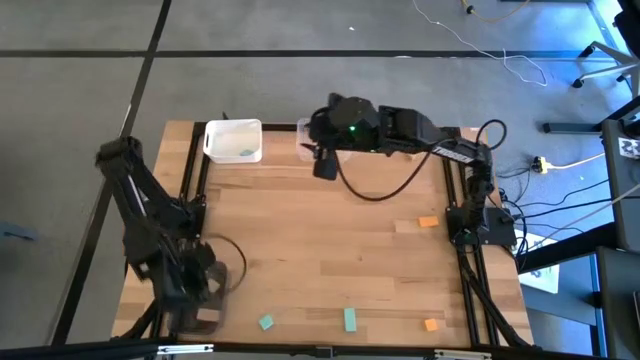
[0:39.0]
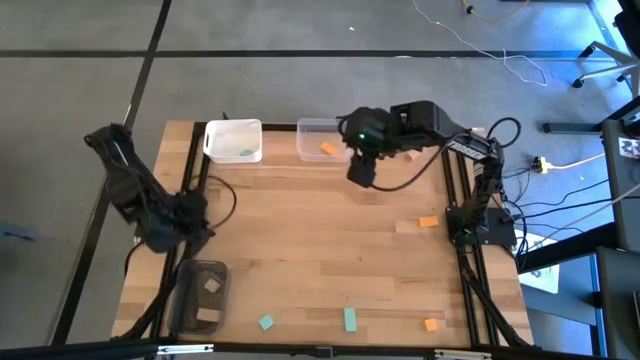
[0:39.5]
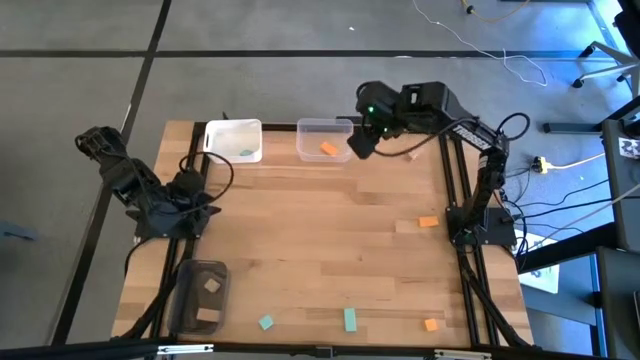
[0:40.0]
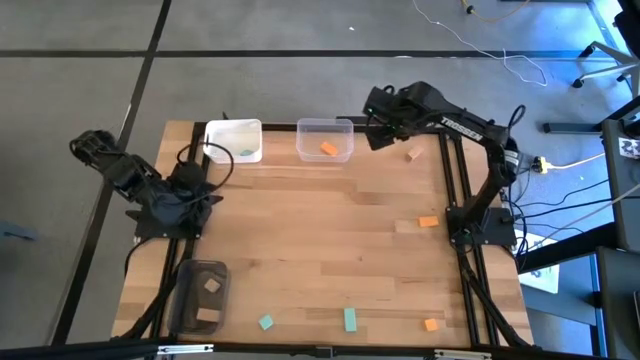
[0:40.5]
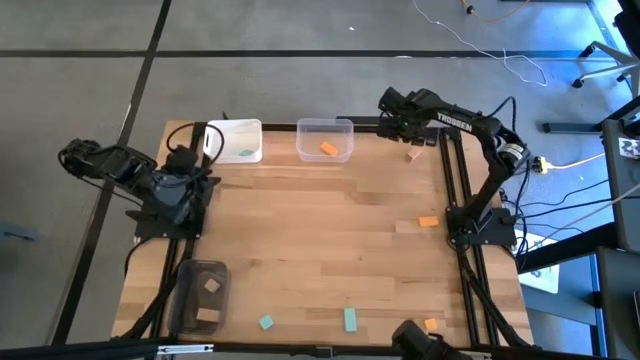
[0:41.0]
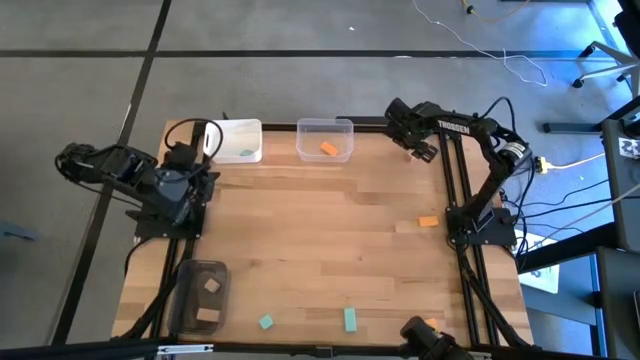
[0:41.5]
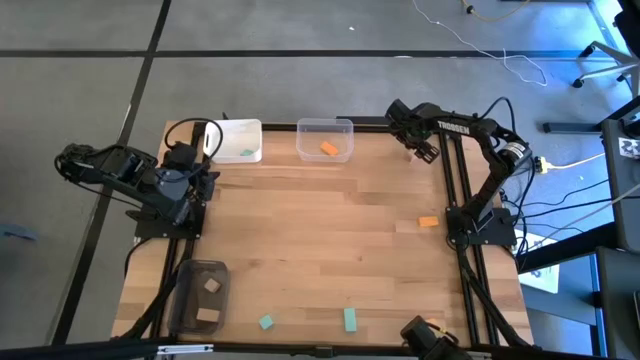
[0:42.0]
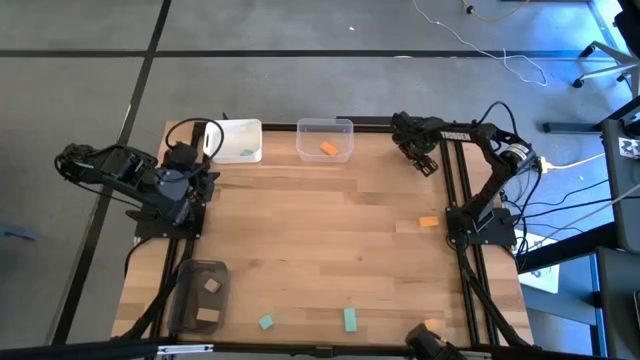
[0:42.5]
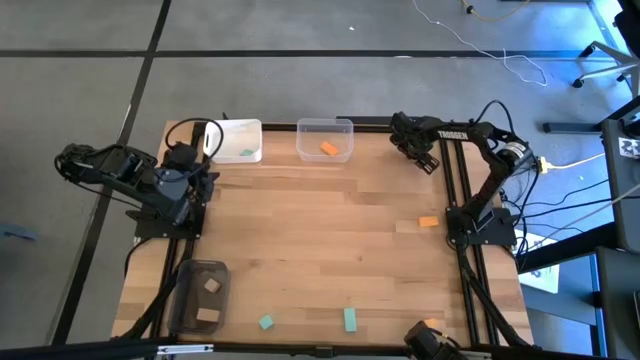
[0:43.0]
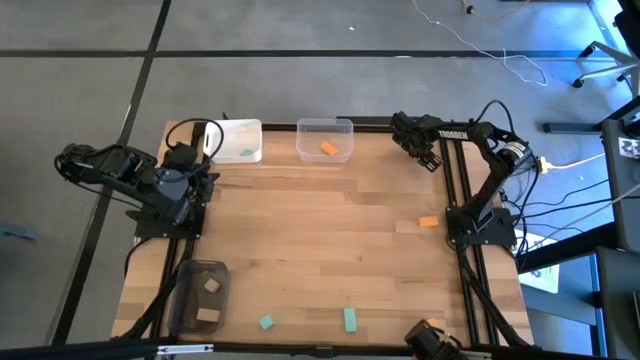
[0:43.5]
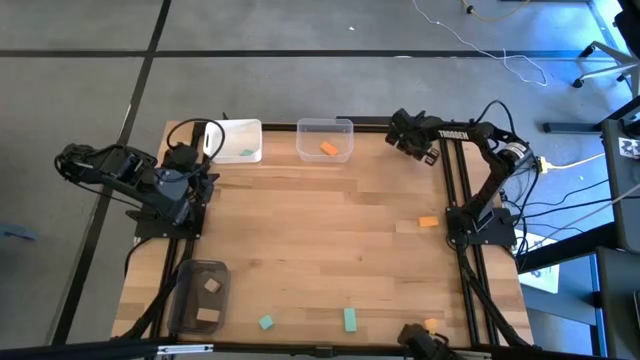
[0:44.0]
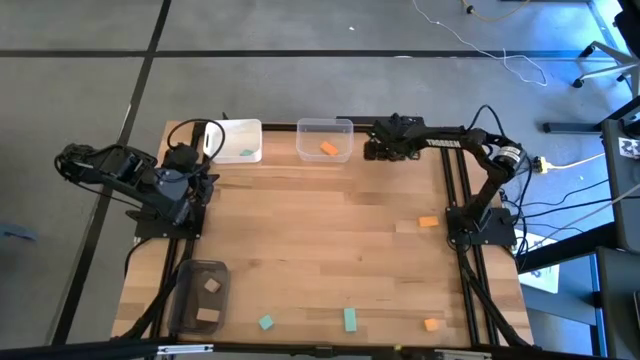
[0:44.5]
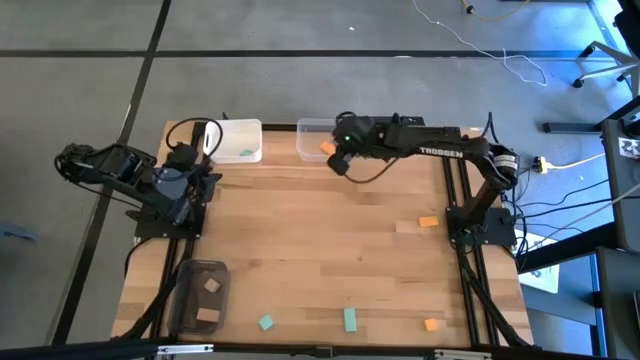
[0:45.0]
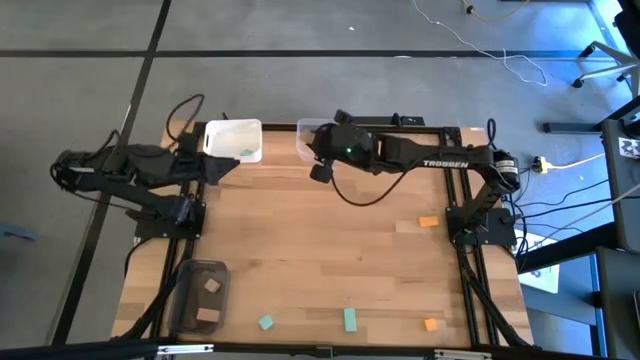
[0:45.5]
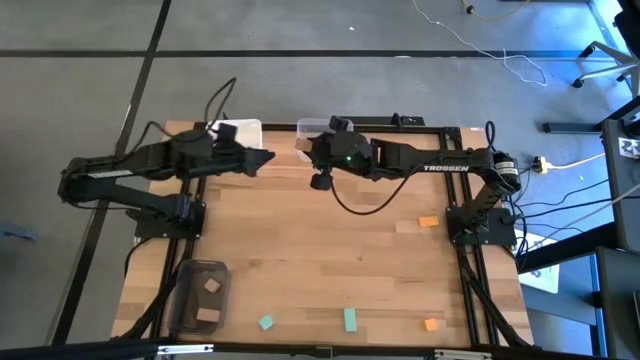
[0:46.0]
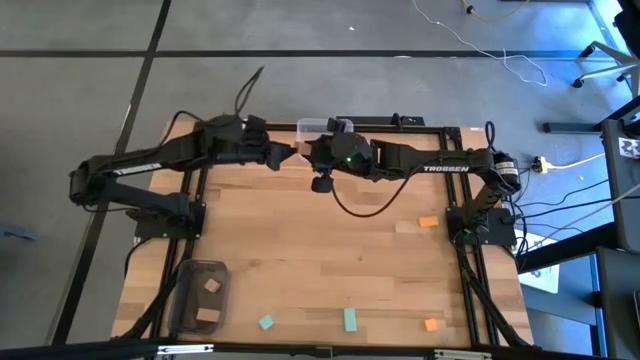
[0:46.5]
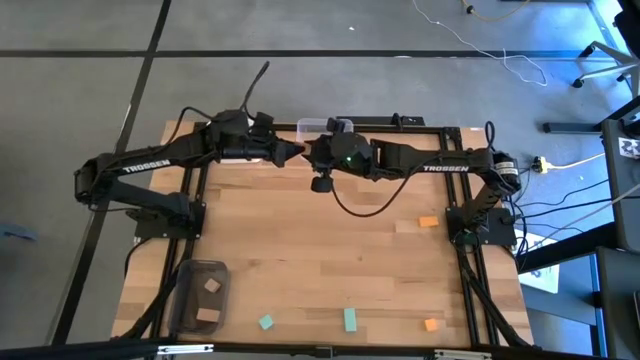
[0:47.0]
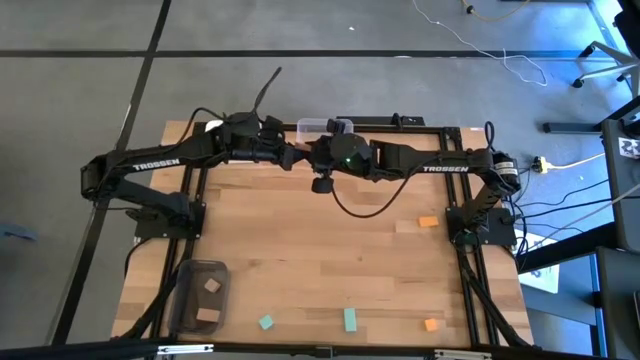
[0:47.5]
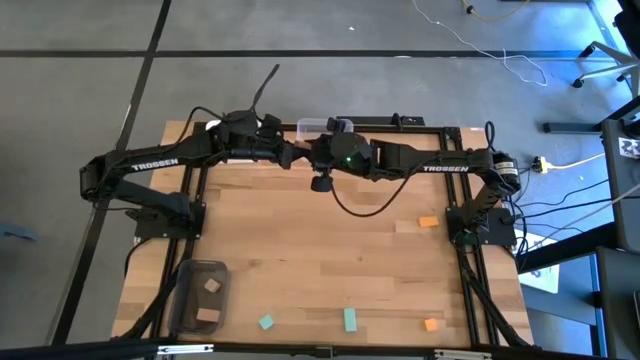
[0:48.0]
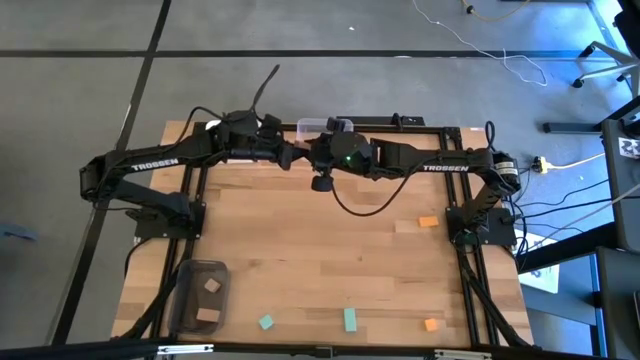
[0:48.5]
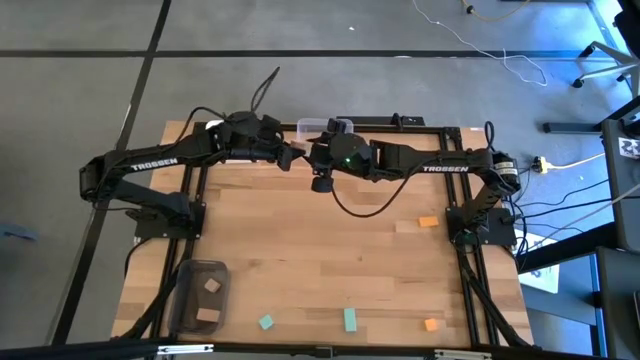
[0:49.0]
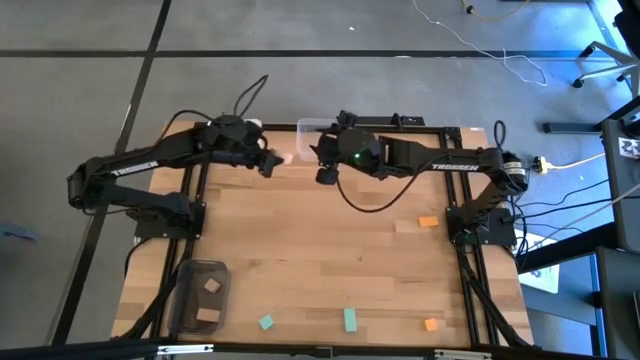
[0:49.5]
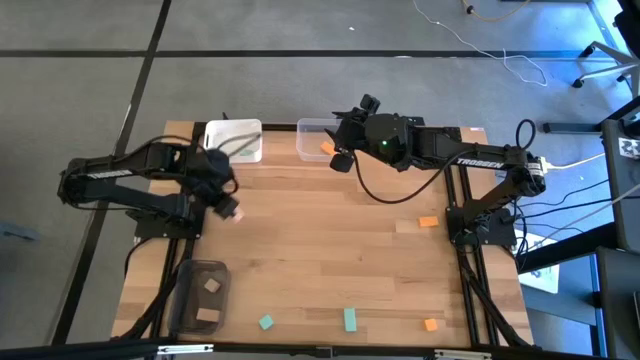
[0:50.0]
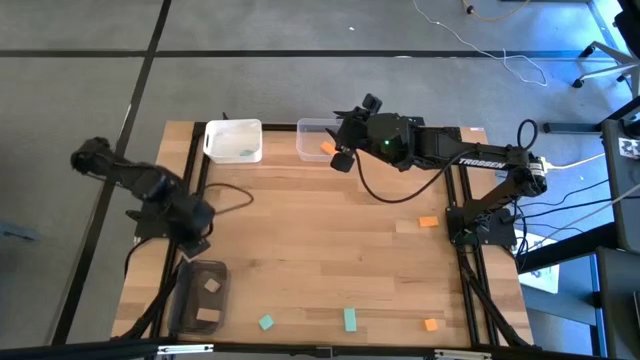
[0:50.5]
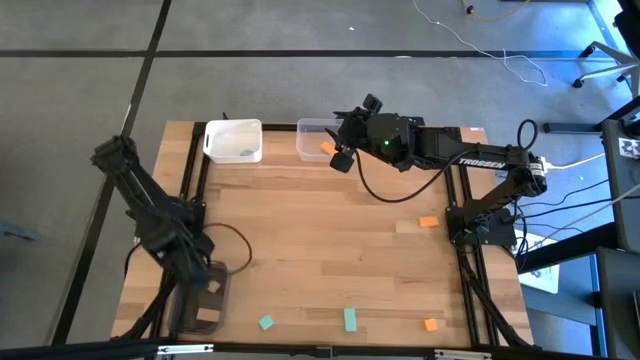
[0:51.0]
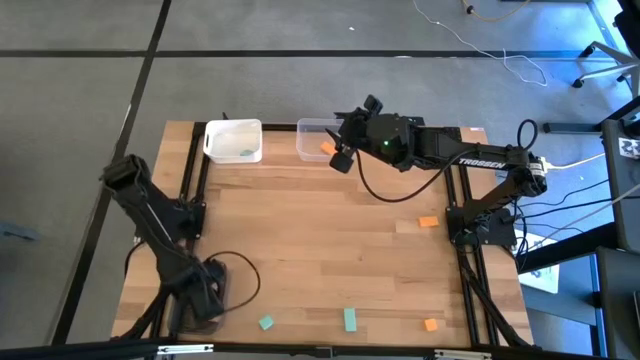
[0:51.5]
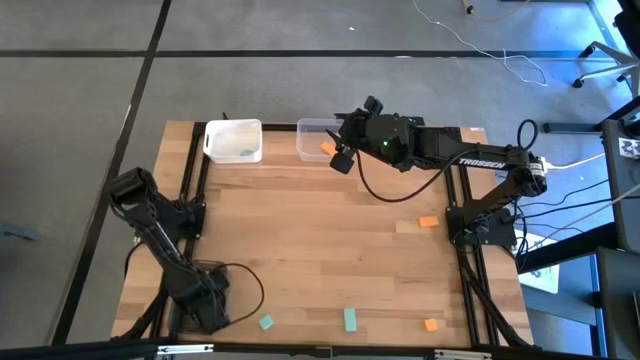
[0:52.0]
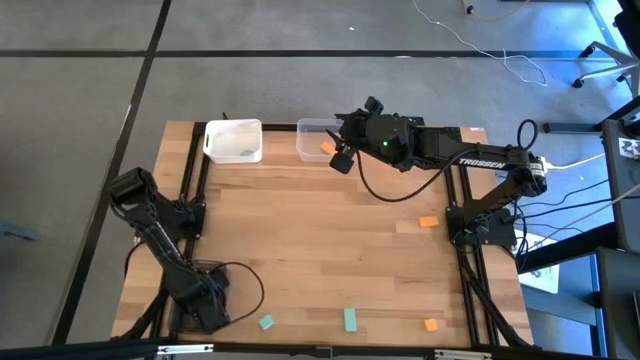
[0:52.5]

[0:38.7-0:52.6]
Task: Sort & place blocks by color
Put the brown block into the black bin

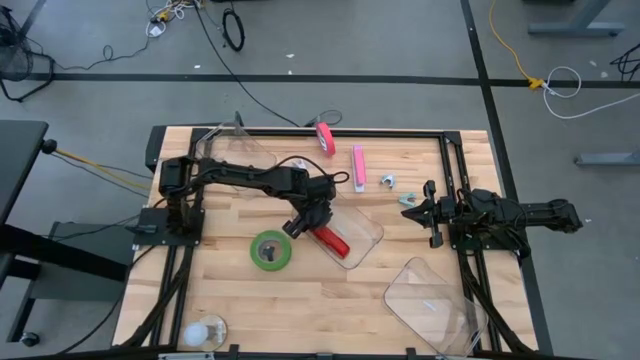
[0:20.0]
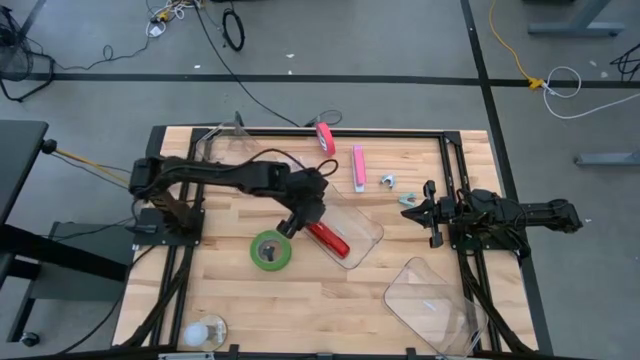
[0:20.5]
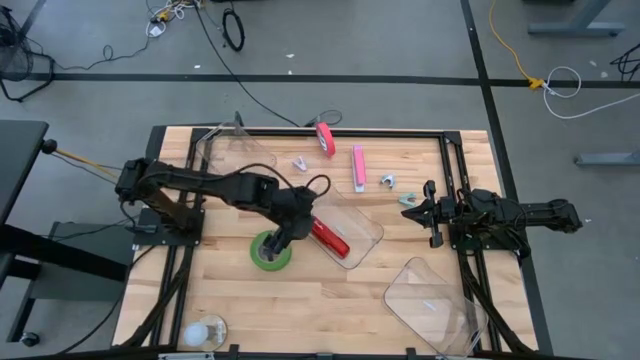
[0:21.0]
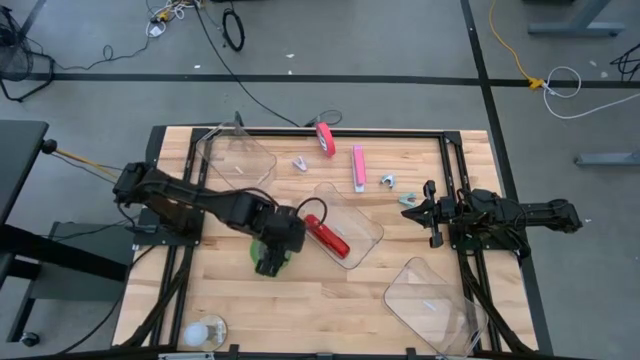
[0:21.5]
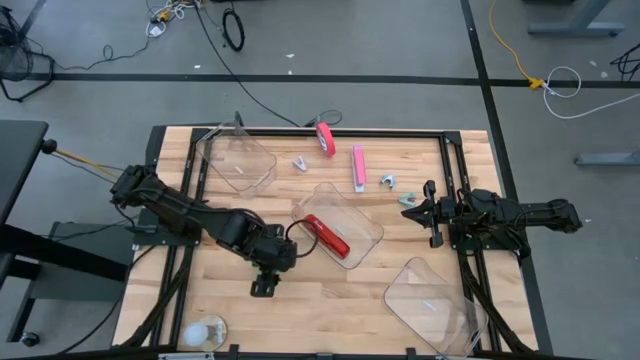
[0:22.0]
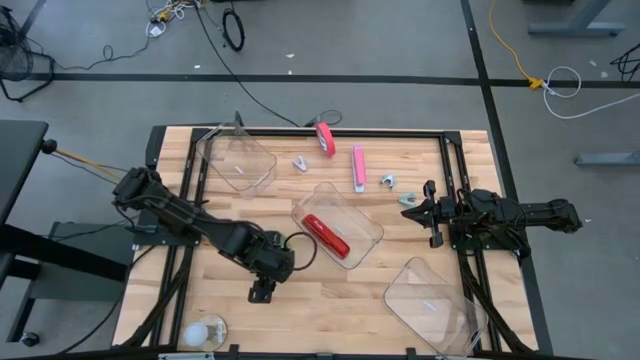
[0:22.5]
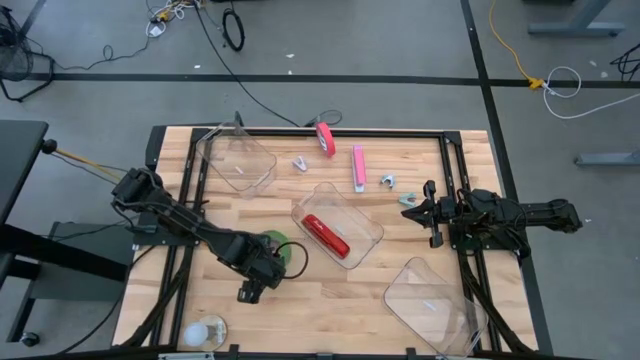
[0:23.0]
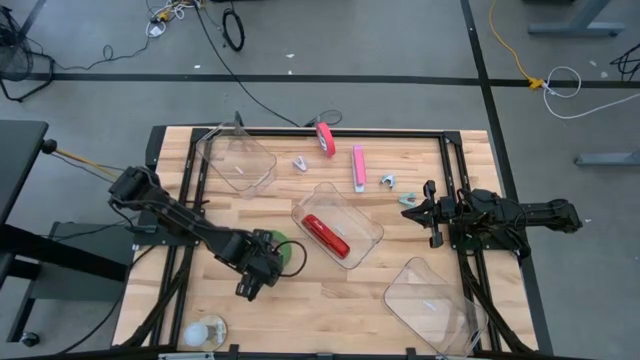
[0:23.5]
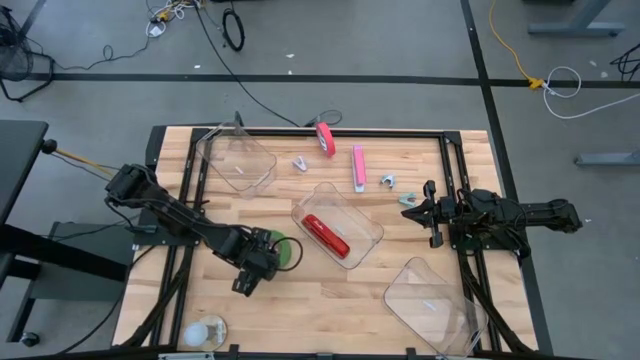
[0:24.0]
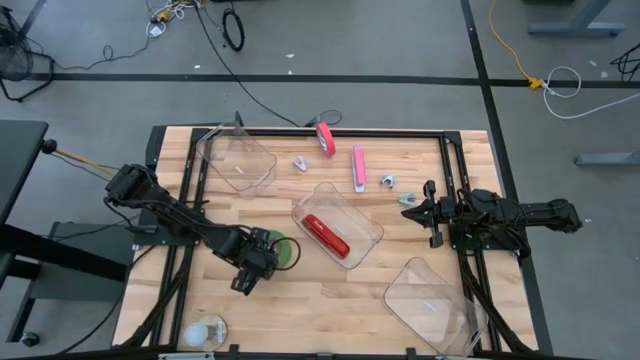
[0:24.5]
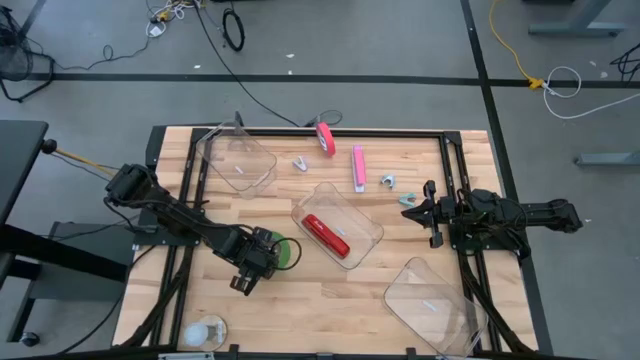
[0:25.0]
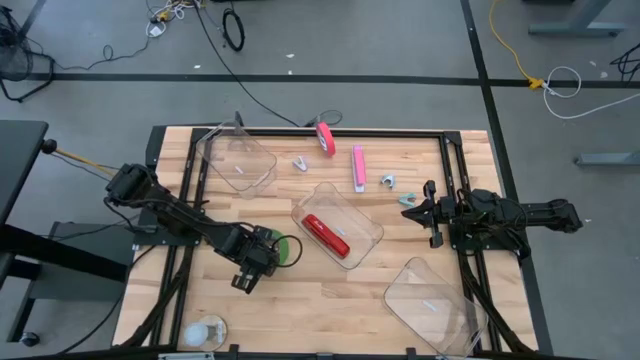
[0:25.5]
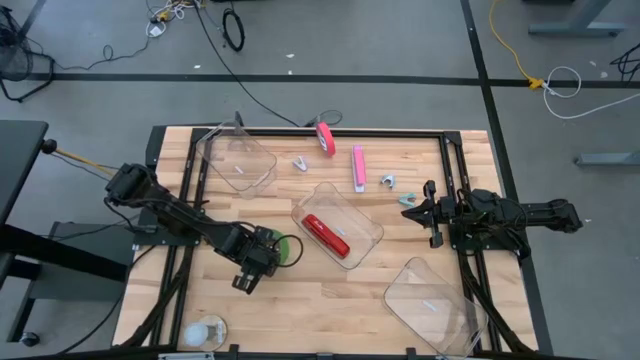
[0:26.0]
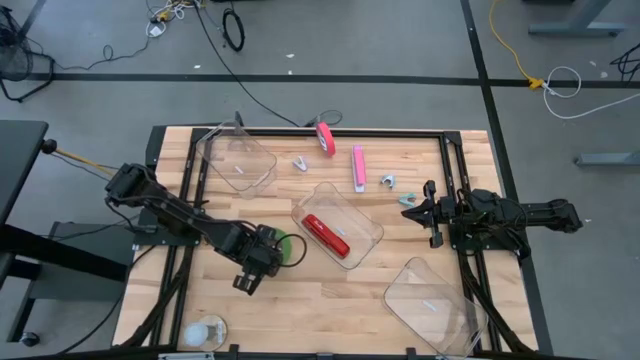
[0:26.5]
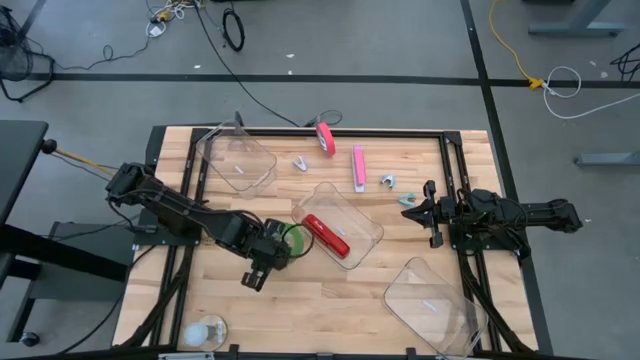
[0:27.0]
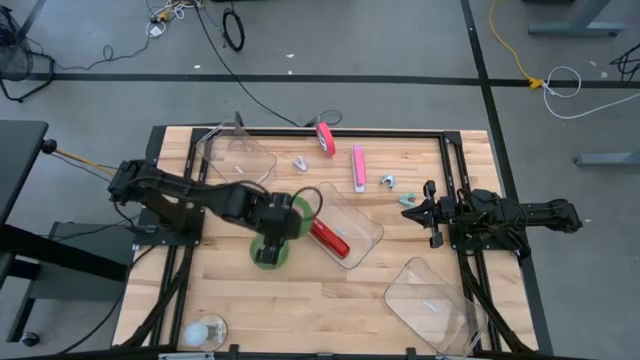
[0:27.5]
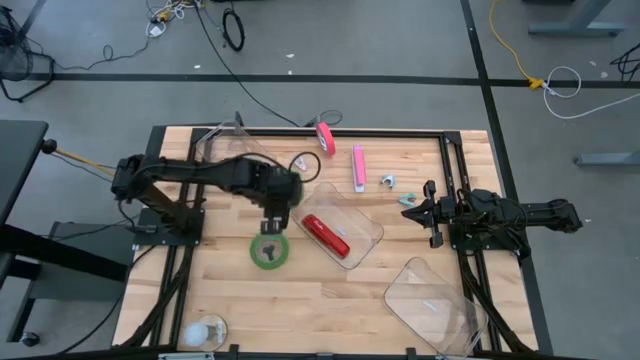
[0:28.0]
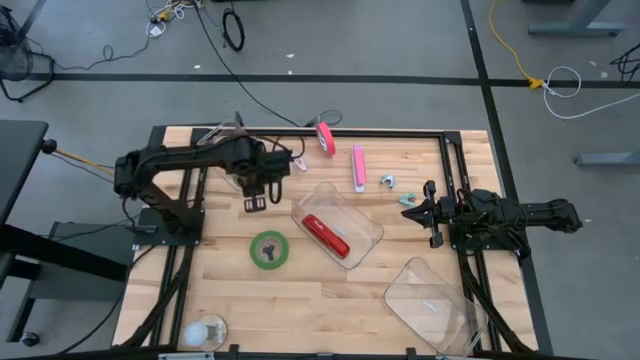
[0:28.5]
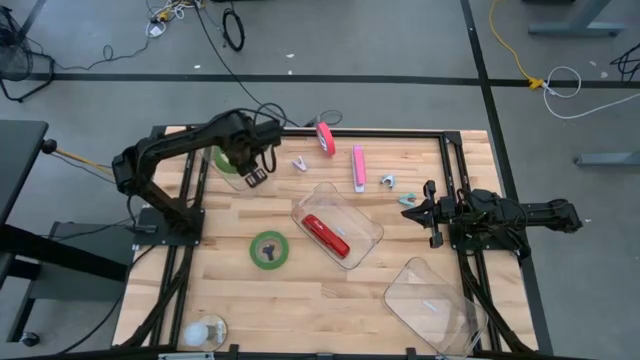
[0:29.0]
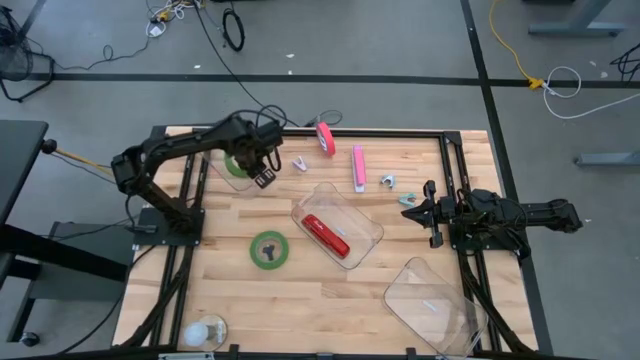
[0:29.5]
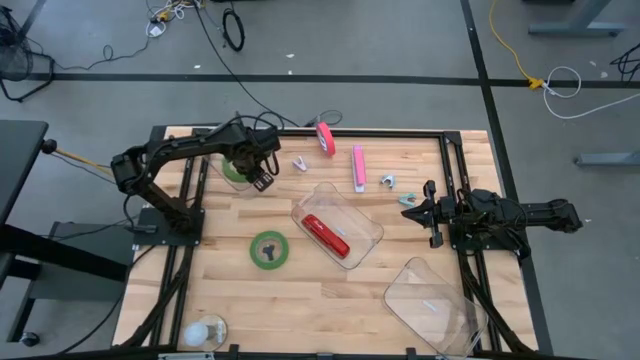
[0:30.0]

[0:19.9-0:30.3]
Task: Pick and place Stapler, Stapler remover, tape
Put the green tape into the top transparent bin
